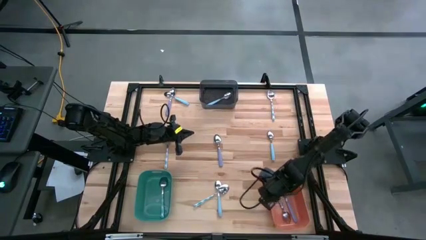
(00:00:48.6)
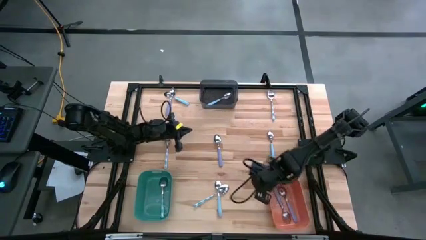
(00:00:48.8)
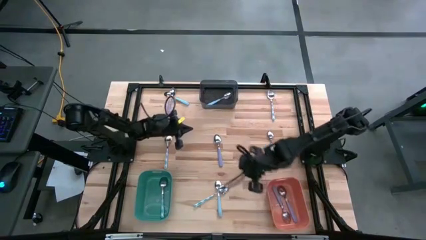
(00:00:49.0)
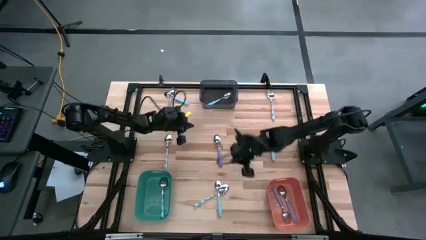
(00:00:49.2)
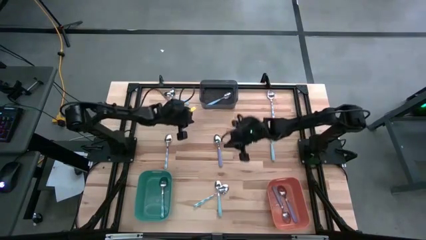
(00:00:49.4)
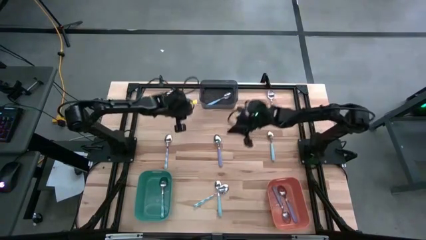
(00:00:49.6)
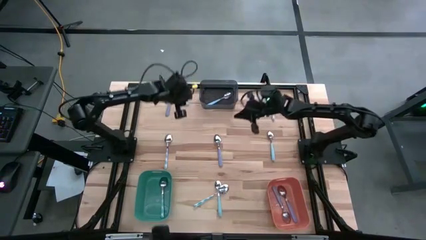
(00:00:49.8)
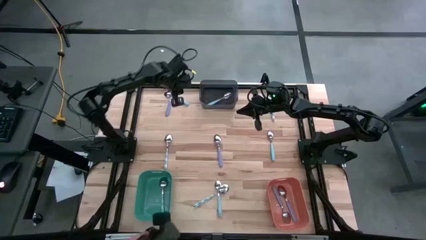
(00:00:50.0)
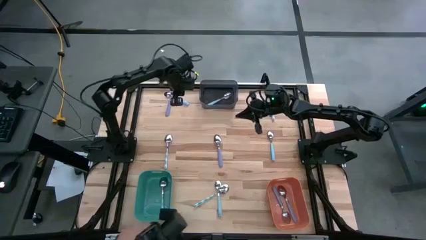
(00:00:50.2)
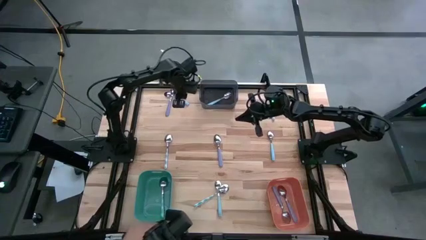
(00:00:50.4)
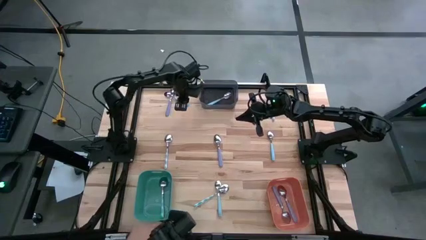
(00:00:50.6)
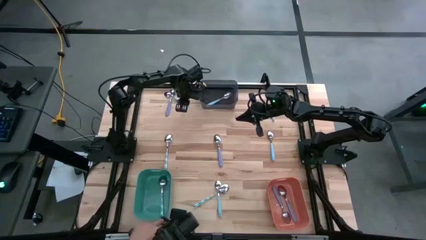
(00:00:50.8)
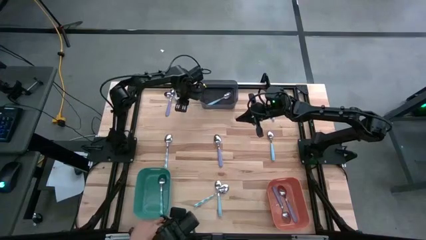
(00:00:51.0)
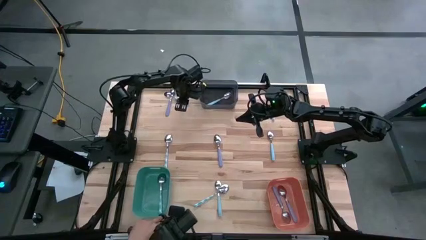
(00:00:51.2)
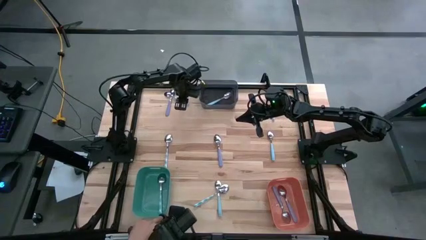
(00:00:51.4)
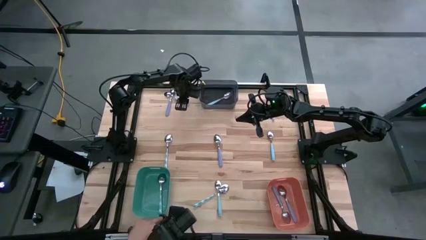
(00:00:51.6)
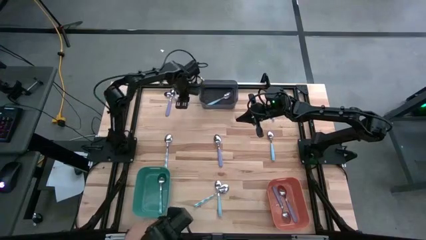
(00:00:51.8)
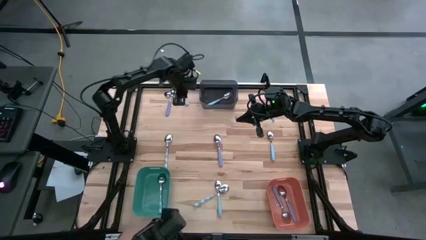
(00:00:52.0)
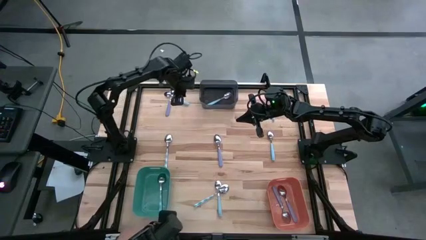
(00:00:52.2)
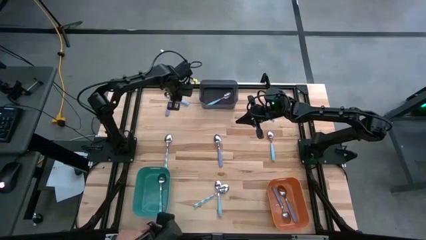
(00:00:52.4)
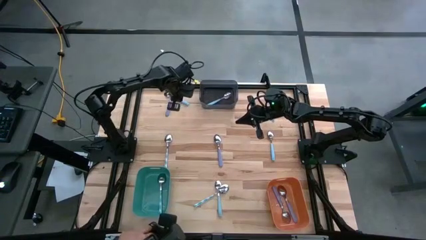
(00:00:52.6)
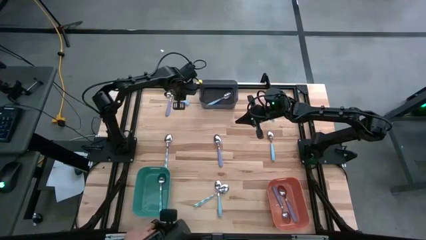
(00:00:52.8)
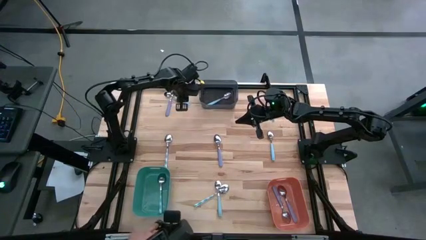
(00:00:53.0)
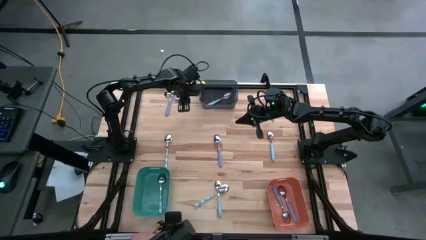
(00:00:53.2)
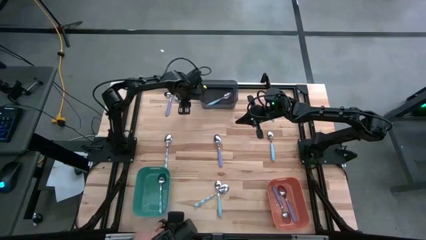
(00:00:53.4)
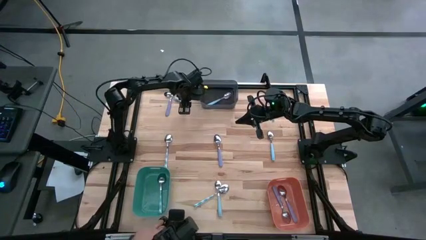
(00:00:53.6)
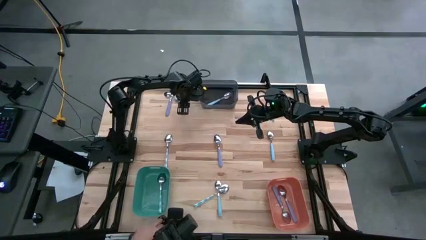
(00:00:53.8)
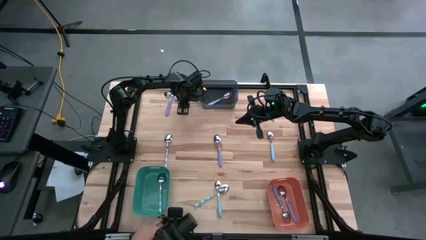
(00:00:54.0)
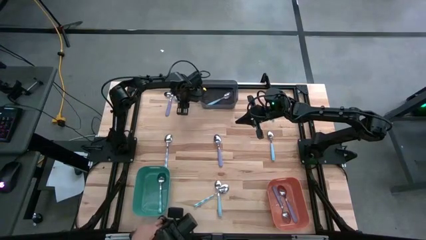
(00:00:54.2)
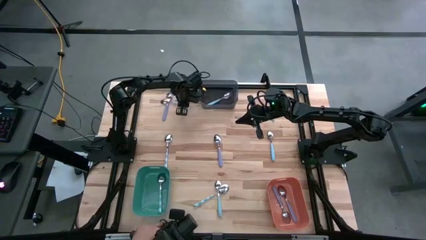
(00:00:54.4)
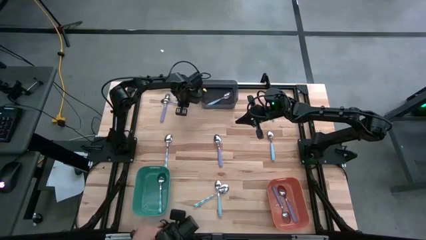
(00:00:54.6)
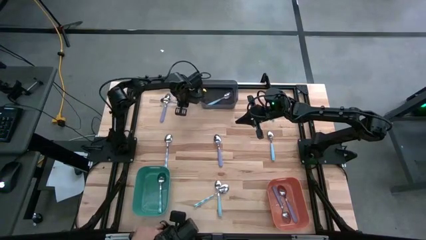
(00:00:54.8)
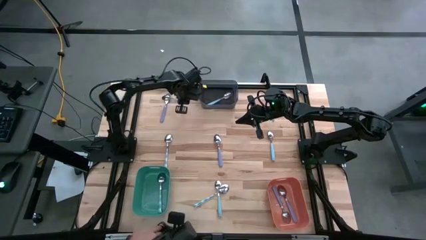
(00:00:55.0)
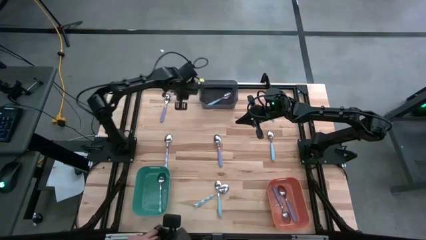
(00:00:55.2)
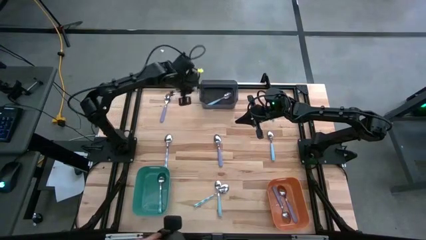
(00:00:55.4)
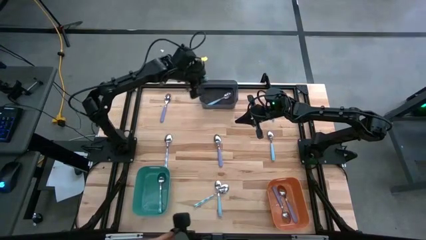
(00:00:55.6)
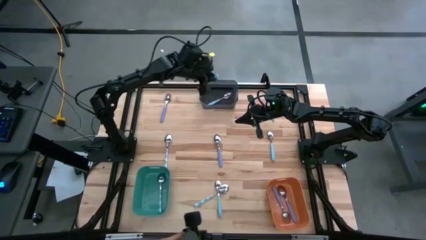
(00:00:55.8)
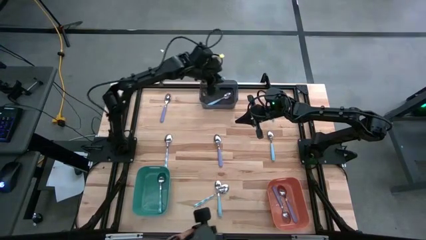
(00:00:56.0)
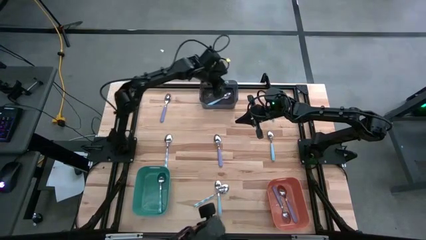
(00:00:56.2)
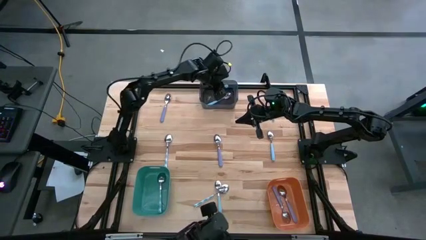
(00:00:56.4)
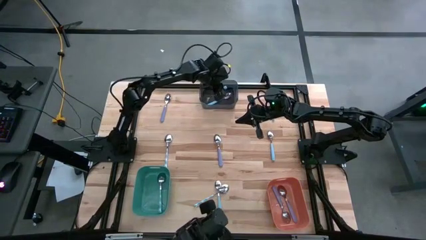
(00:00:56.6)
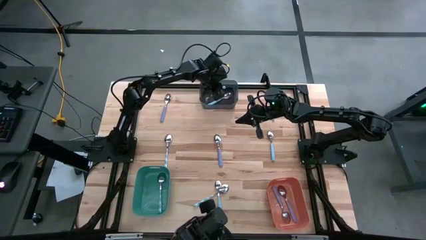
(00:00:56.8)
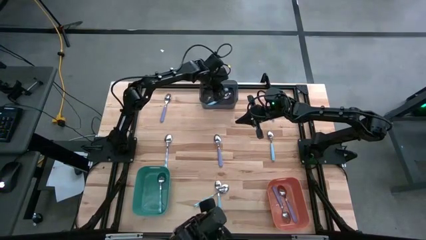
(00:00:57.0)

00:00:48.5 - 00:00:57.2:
Task: Sort silverware by color (type)
Put the blue spoon into the black bin

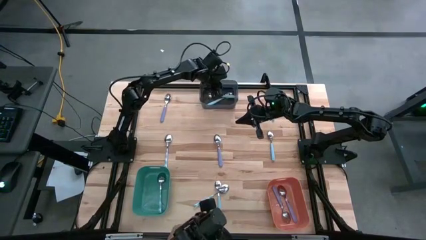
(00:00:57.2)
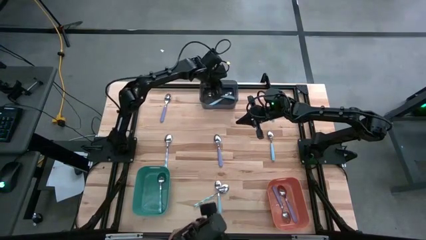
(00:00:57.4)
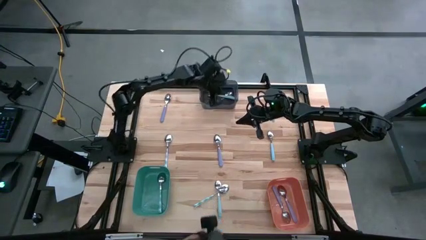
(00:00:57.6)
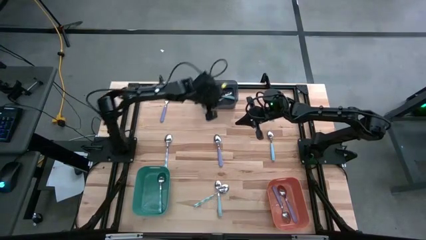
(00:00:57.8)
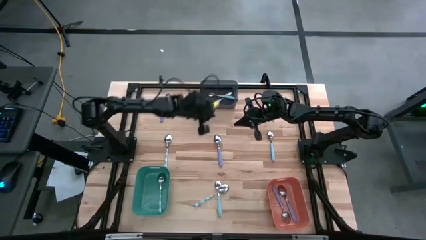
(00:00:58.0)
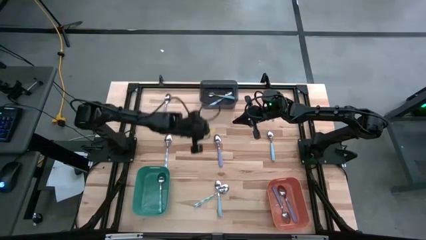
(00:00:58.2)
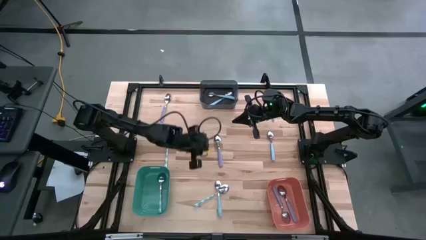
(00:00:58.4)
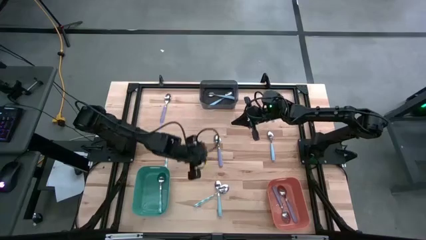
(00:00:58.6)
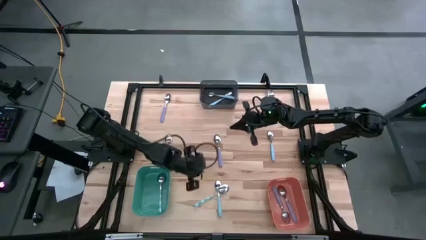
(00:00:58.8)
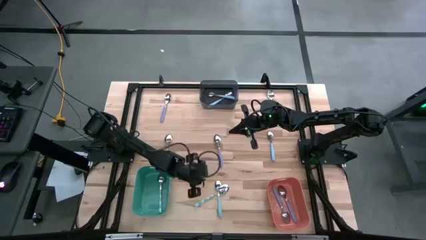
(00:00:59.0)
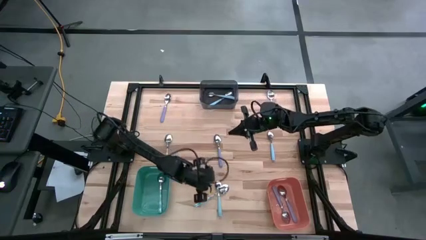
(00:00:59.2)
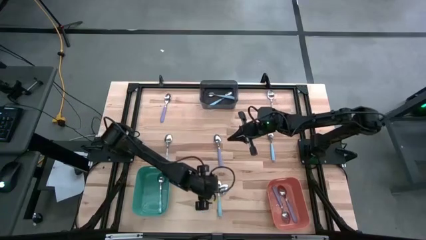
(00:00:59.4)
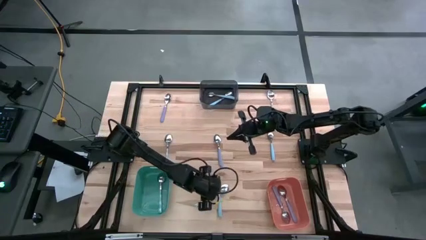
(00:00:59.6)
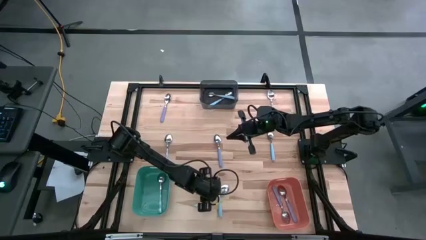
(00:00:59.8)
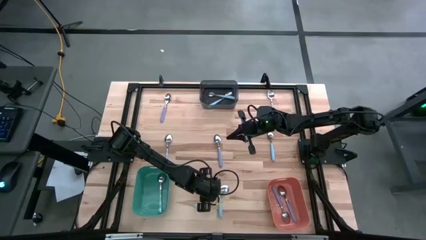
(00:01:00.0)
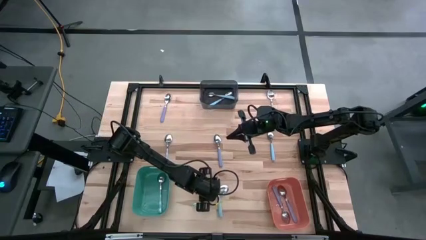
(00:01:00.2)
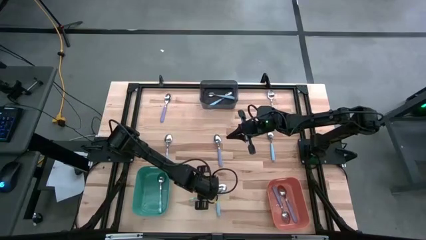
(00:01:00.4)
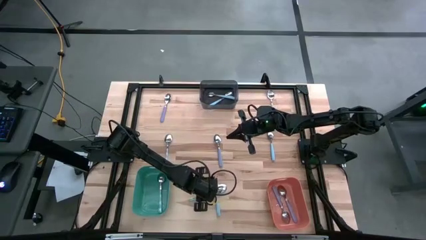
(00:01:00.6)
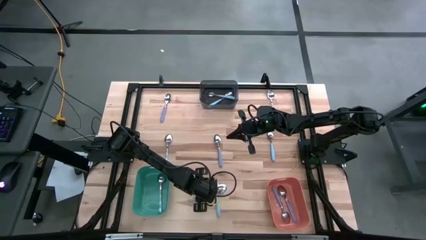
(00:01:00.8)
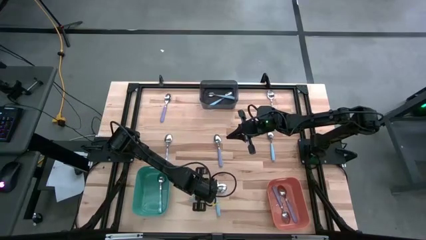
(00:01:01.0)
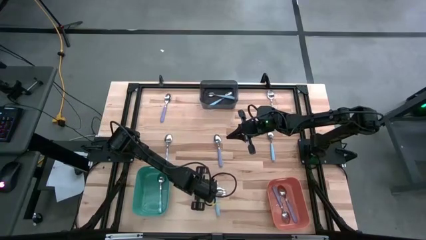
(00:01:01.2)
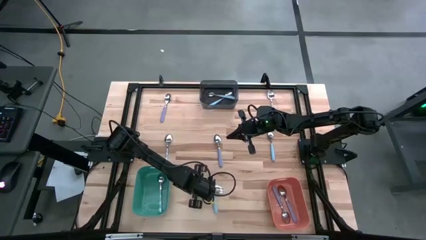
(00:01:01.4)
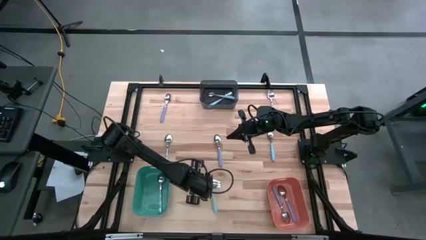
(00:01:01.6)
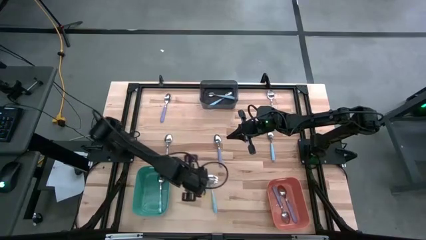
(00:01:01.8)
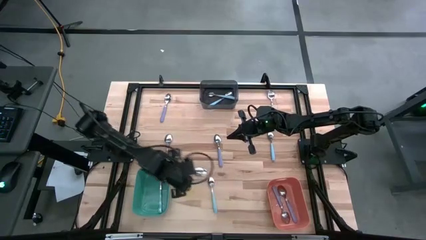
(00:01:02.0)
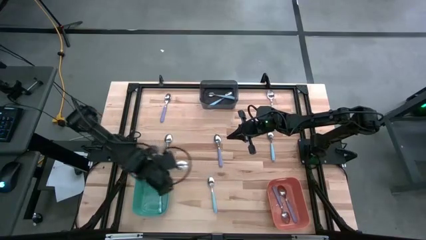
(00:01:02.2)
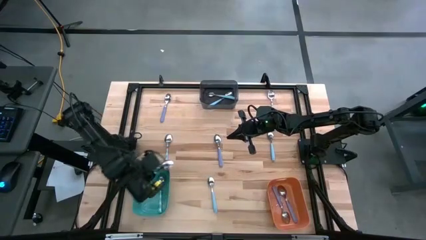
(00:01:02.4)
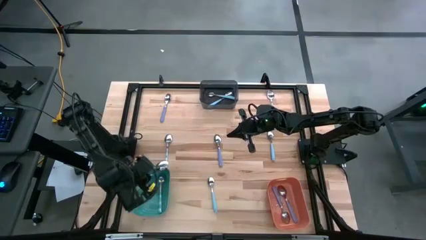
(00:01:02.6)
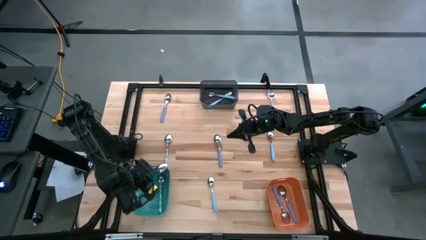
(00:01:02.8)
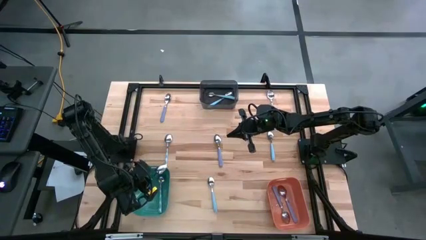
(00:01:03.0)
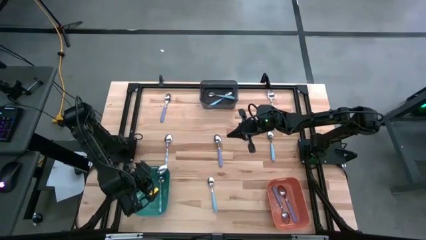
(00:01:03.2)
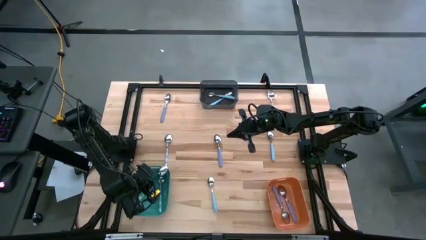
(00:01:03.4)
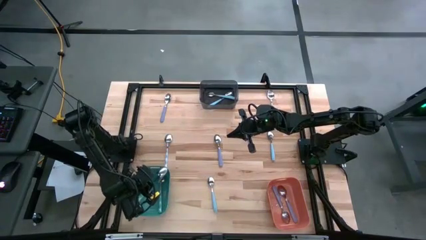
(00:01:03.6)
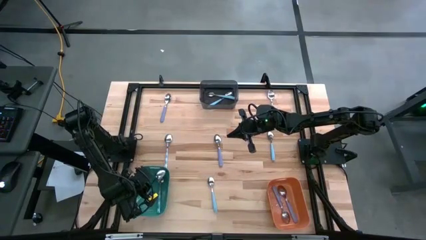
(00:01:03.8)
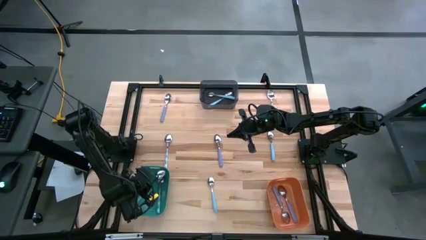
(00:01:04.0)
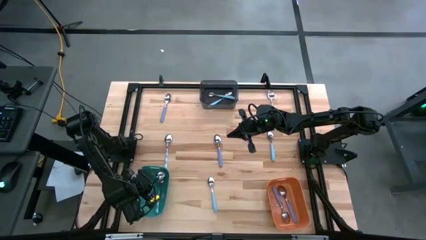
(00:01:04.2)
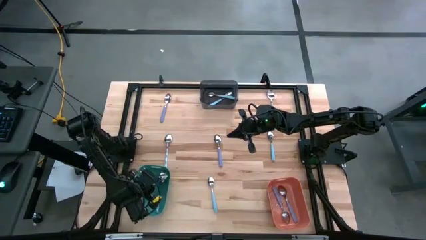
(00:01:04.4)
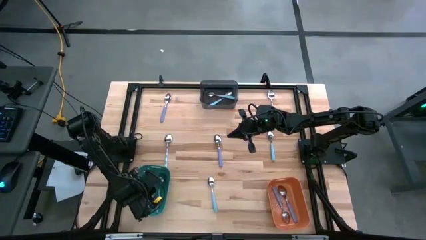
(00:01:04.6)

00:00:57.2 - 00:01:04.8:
Put the white and blue spoon into the blue bin
